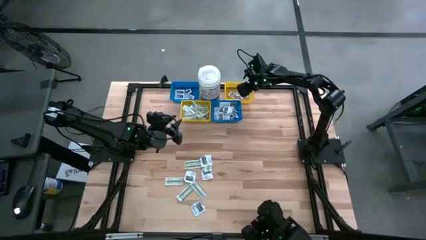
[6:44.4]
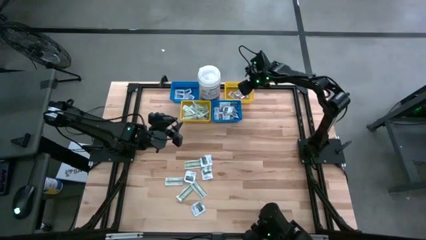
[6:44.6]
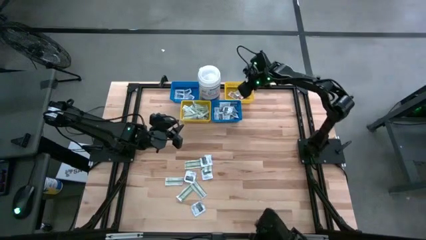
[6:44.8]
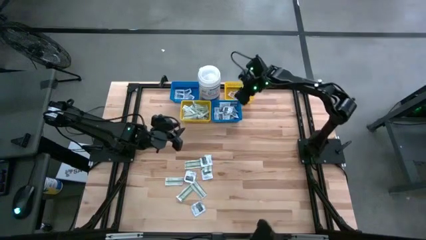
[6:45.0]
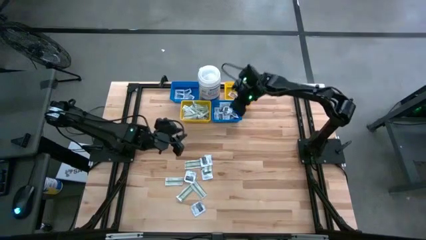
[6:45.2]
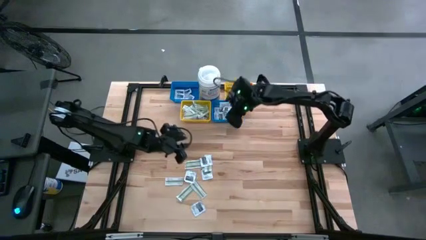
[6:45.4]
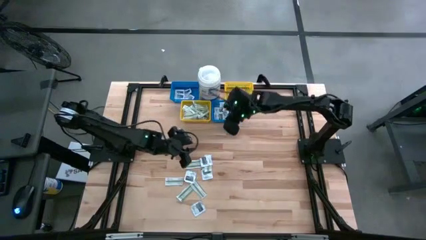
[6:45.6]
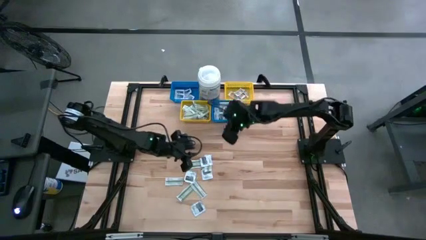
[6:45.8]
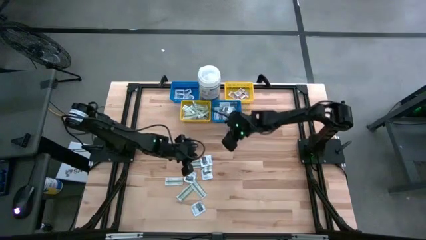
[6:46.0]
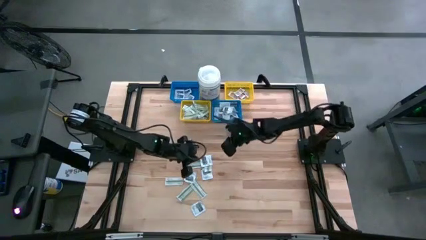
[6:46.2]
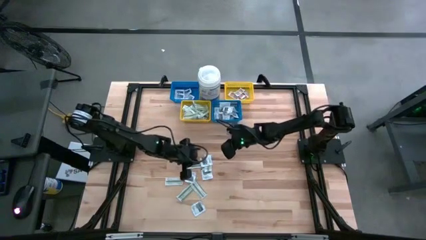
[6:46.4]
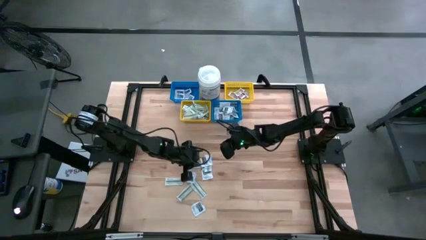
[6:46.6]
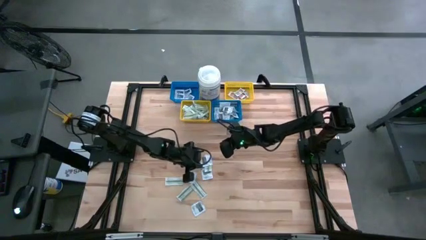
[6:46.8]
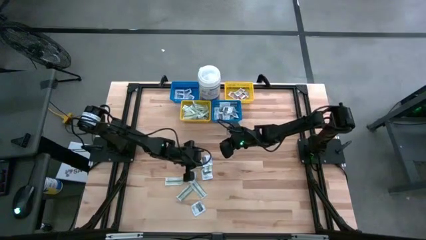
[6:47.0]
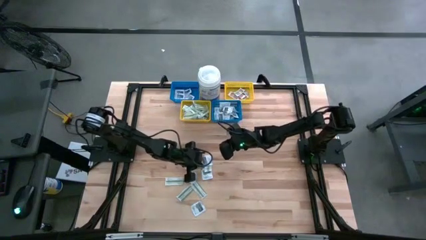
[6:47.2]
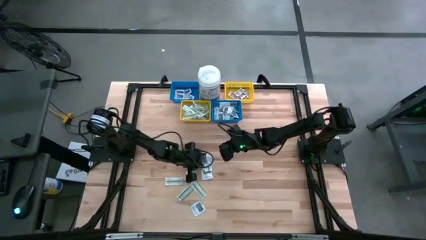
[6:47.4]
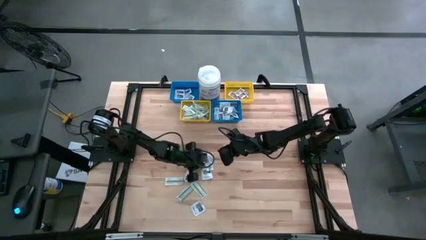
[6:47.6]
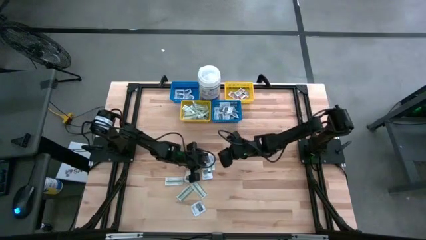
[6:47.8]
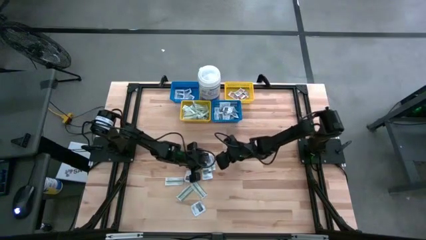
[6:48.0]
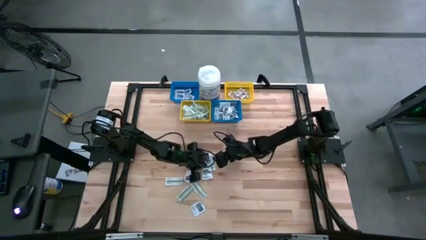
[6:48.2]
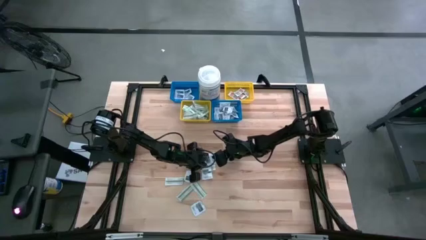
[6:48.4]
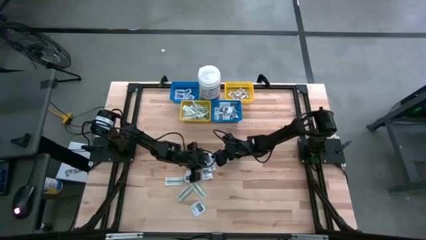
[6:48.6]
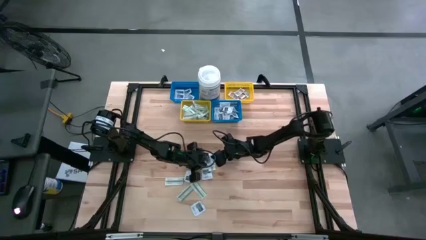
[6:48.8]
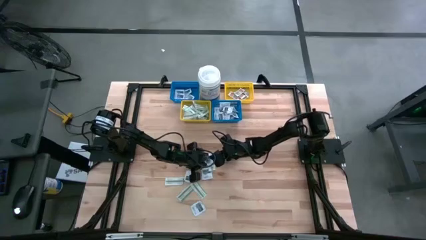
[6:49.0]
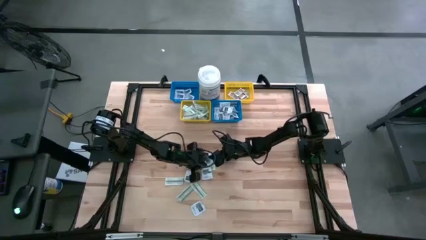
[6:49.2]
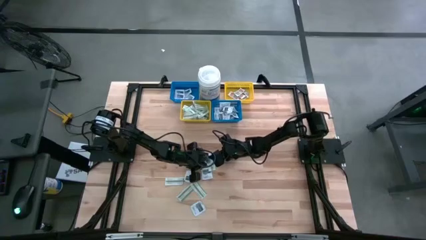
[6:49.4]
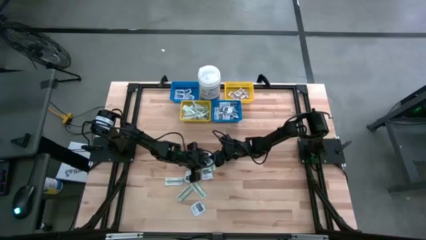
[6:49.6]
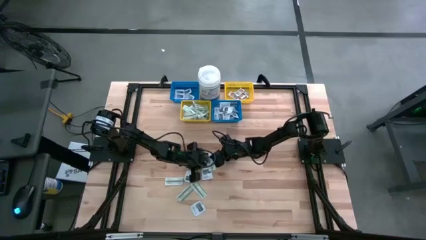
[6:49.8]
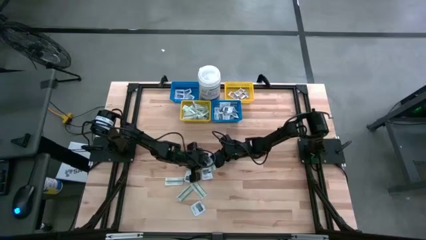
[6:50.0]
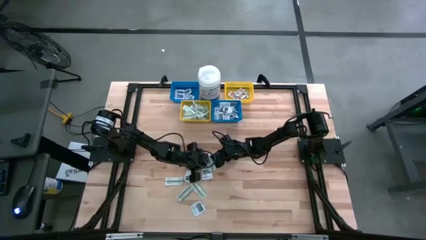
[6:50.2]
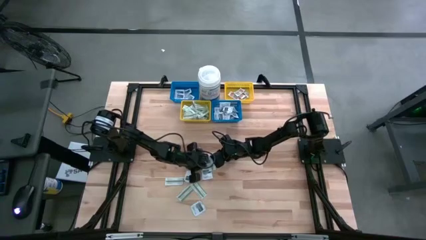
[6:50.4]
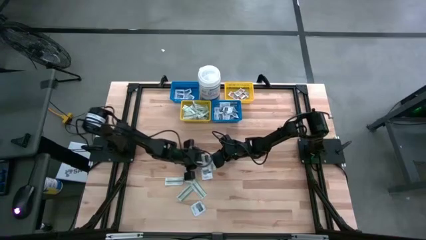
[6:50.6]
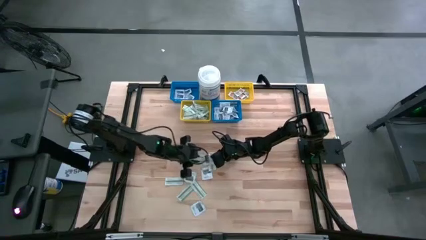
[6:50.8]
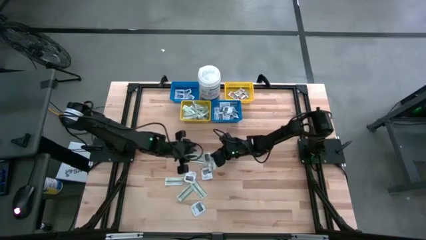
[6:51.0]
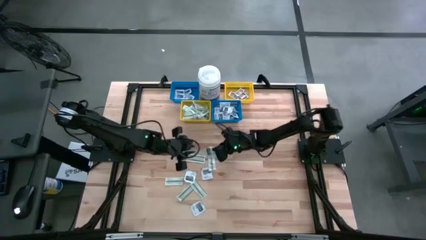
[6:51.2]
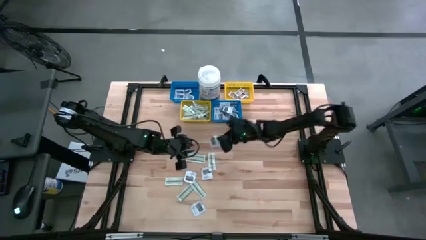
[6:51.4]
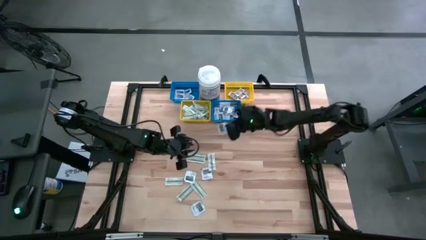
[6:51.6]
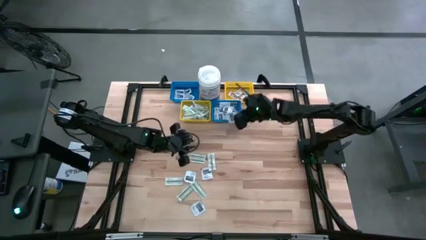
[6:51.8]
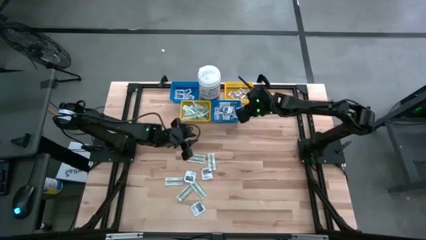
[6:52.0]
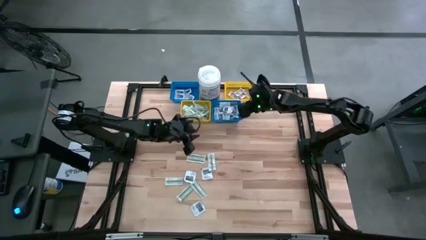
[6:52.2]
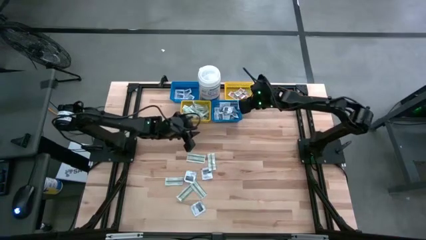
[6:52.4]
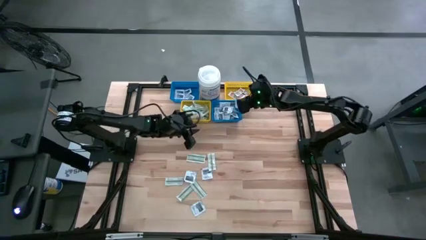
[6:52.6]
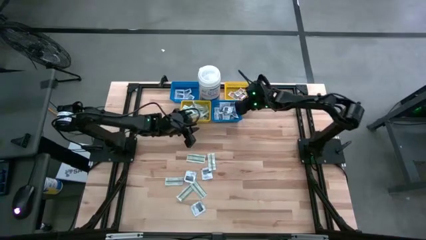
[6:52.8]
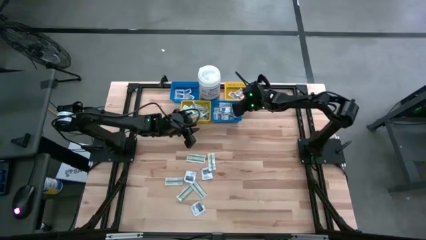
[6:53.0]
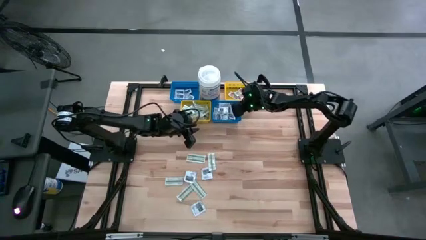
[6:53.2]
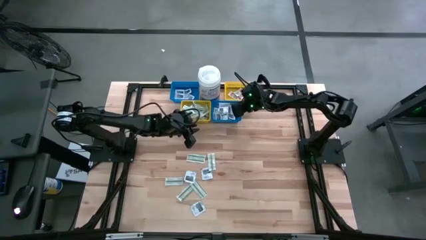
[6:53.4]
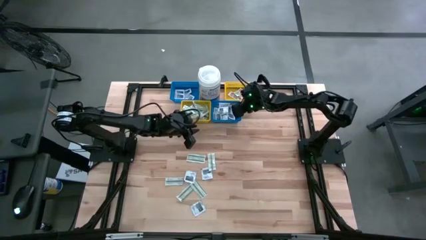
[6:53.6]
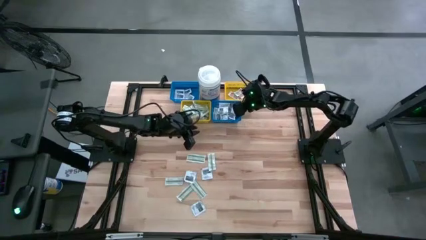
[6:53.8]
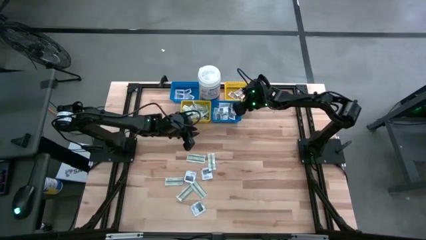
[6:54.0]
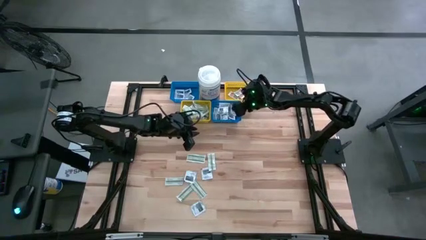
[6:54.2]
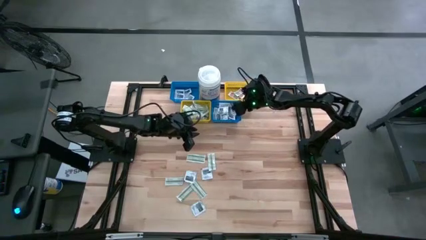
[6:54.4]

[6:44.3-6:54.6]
Task: Pick & Place First Aid Supplies
Put the black towelette pack into the right blue bin

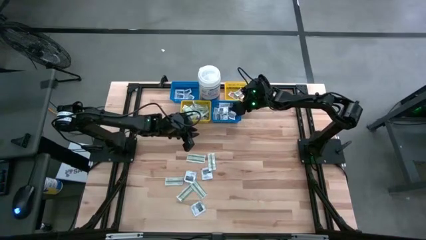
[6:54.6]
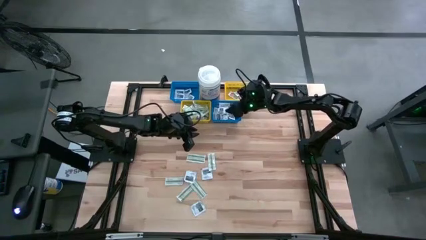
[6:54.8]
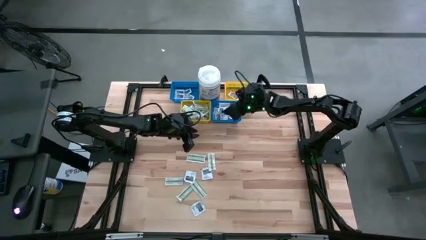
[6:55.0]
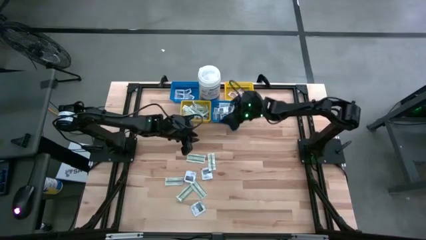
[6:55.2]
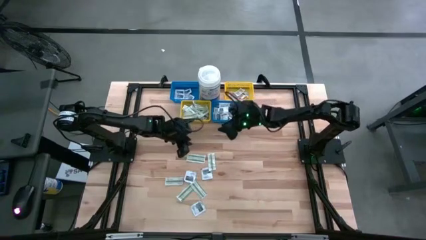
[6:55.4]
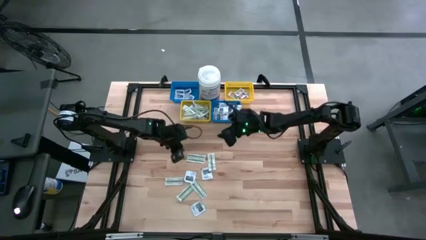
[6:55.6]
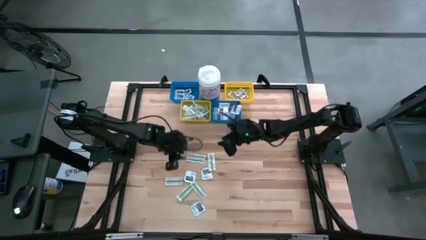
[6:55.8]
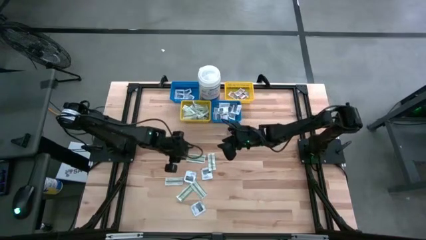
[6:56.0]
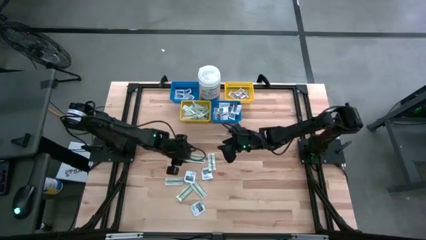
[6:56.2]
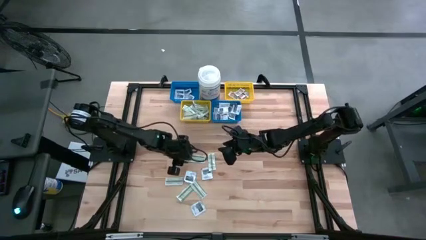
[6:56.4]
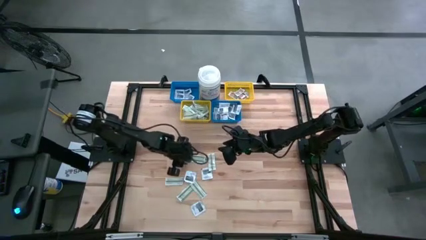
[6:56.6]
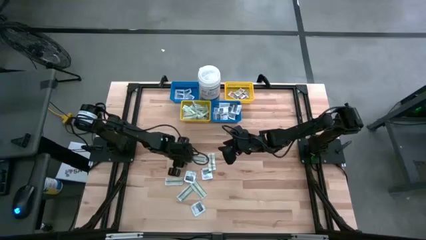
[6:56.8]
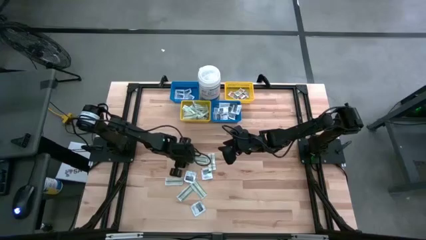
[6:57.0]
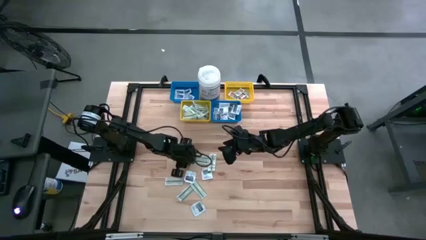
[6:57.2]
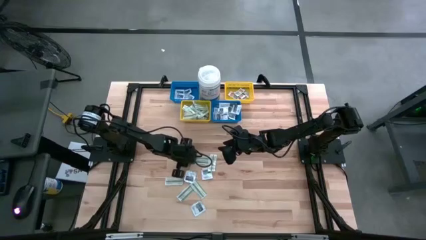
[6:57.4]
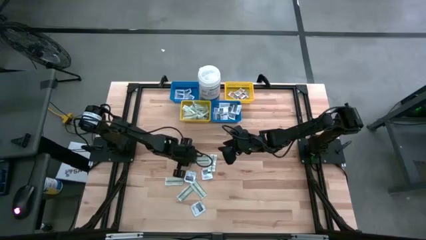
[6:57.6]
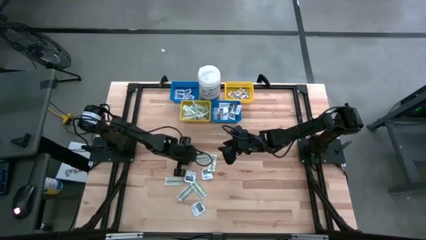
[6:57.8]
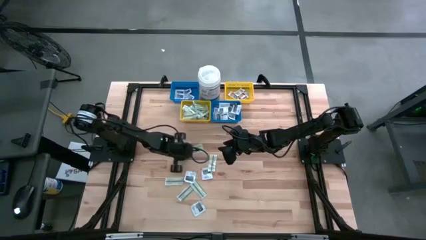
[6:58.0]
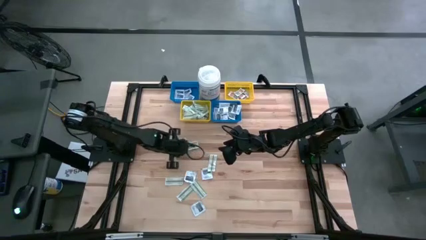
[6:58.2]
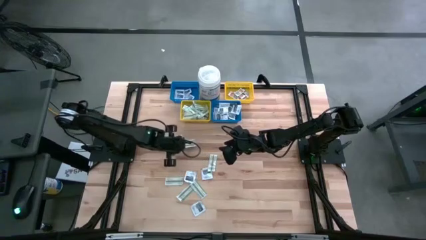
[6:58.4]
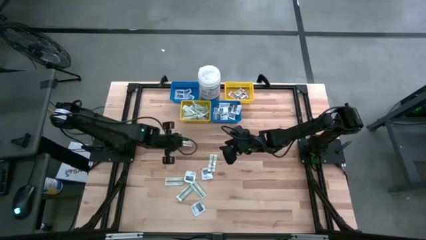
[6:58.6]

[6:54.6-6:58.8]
Put the green bandage pad into the left yellow bin

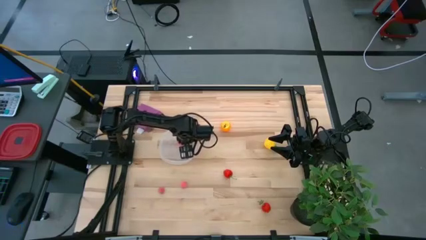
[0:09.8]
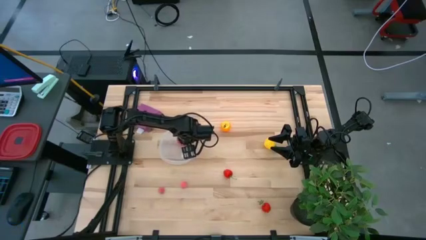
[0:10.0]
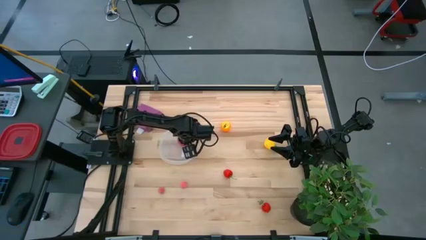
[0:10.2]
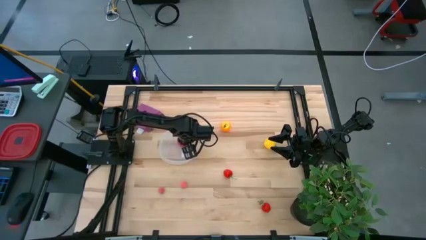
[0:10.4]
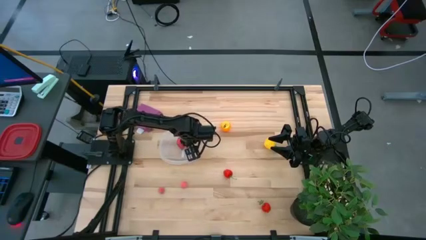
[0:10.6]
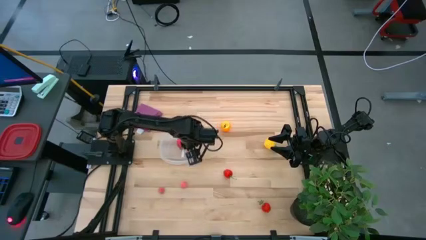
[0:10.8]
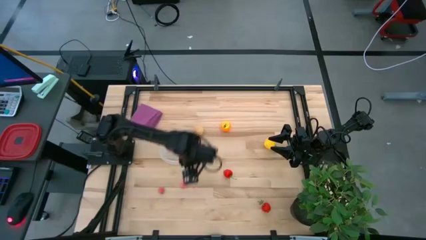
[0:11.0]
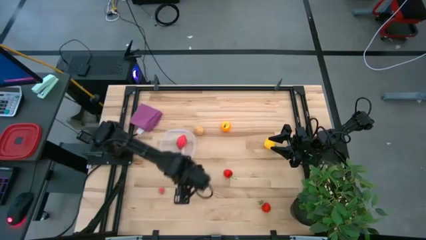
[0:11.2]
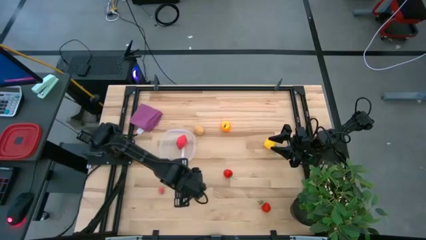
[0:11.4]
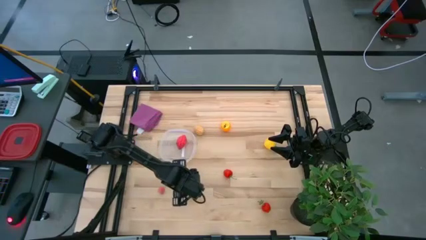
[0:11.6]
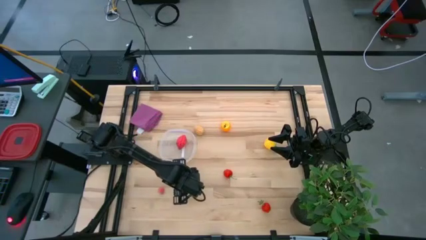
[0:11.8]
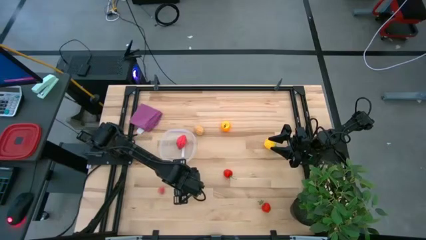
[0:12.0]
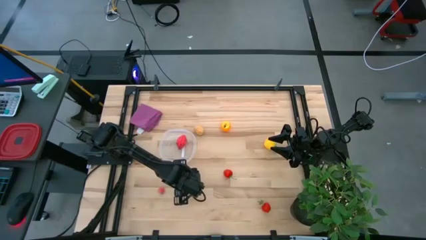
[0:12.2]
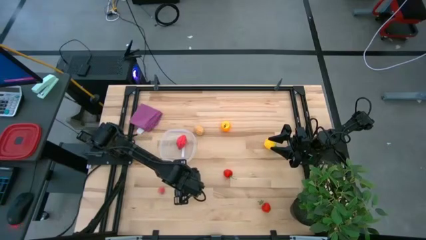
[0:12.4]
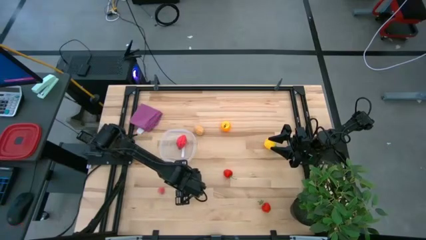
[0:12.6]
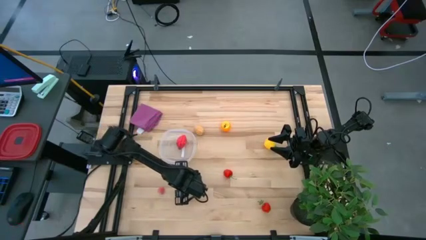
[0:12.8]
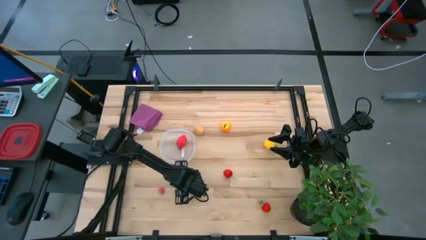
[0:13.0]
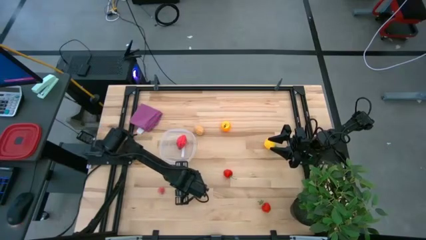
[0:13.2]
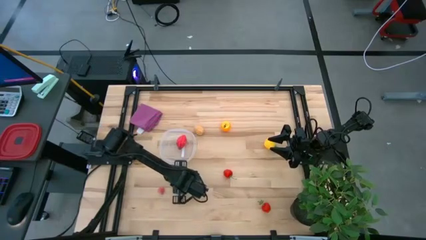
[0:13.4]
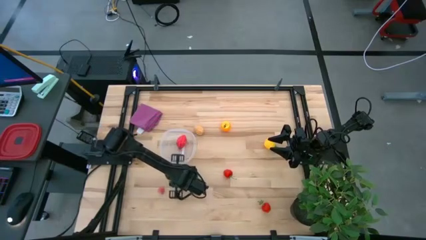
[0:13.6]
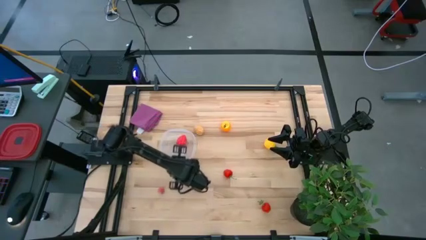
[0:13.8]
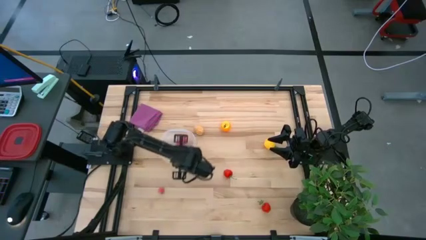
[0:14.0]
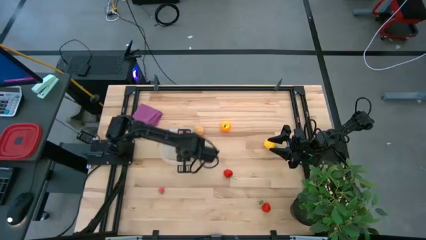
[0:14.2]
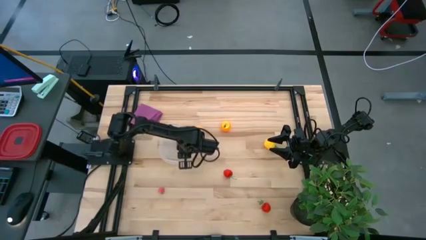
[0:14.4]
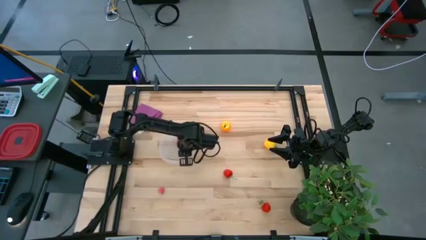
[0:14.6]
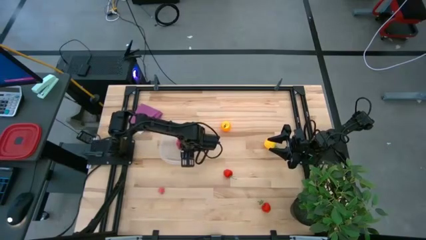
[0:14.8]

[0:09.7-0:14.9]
Task: Pick and placing Produce into tupperware
Put the right pink peach into the transparent bin
